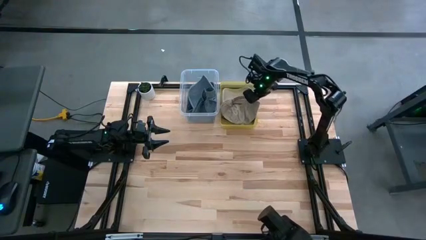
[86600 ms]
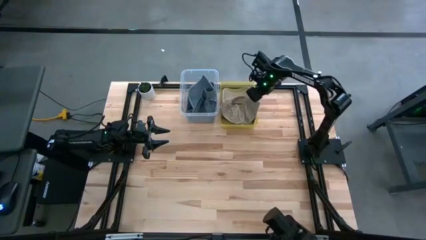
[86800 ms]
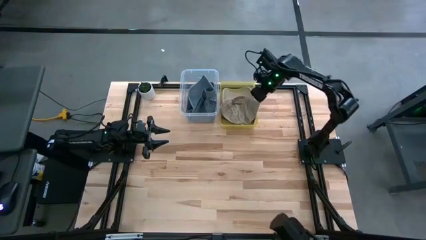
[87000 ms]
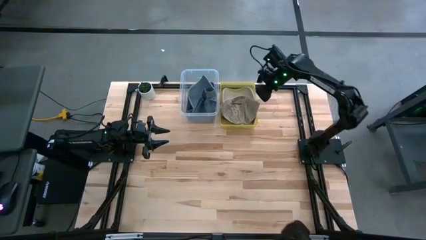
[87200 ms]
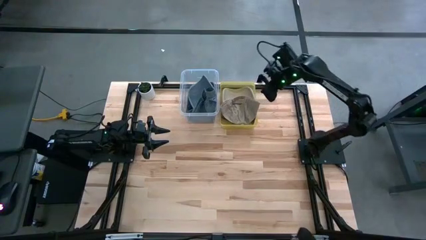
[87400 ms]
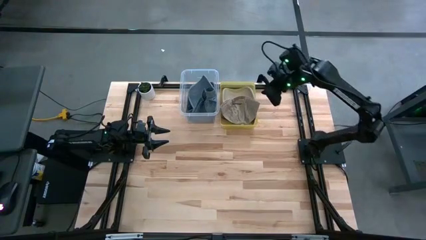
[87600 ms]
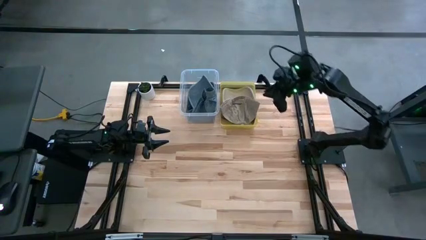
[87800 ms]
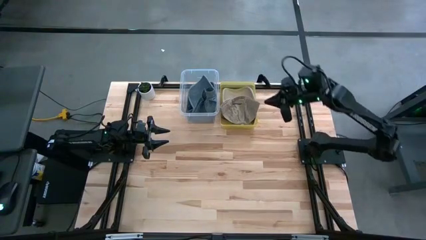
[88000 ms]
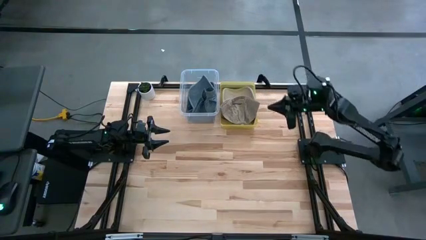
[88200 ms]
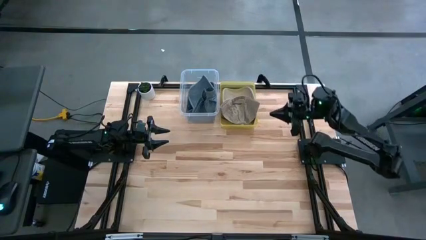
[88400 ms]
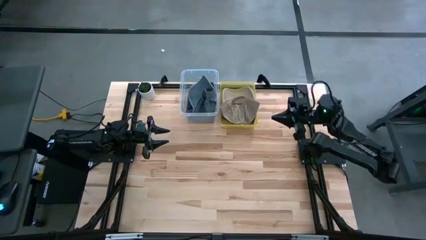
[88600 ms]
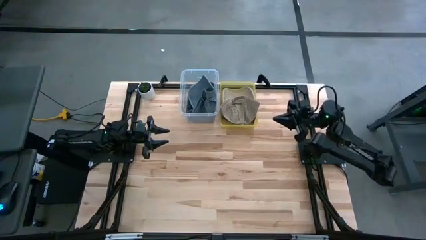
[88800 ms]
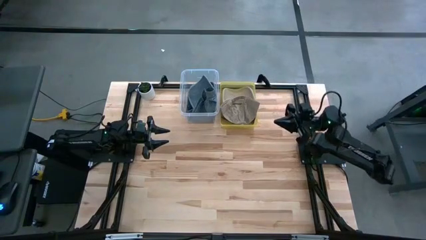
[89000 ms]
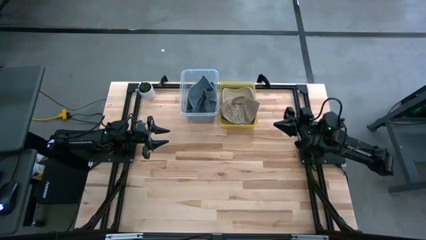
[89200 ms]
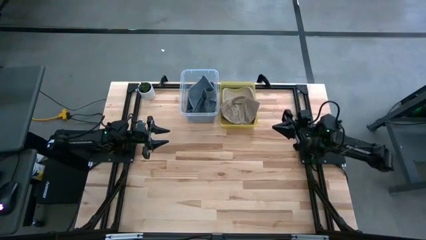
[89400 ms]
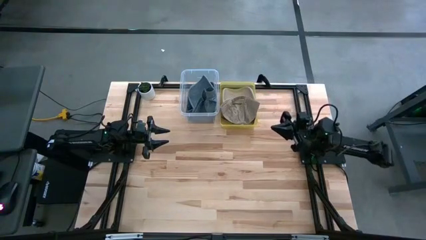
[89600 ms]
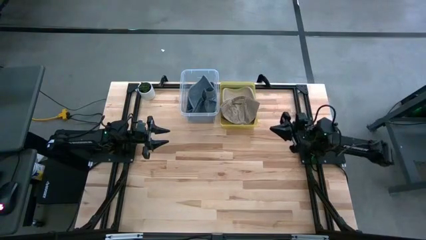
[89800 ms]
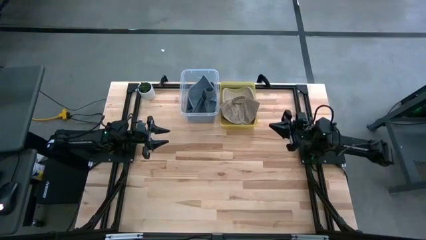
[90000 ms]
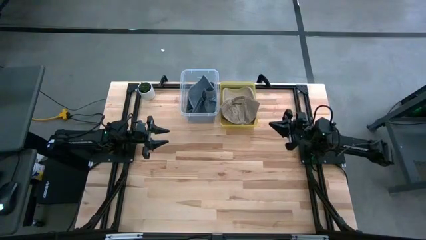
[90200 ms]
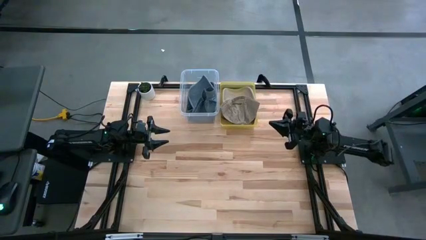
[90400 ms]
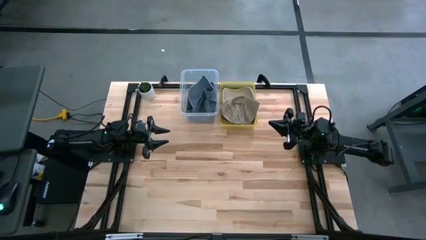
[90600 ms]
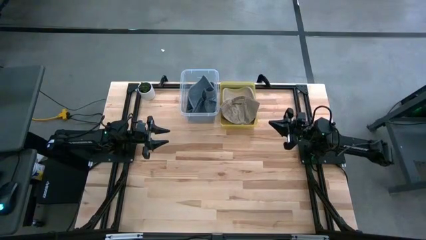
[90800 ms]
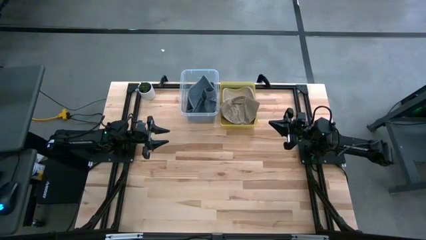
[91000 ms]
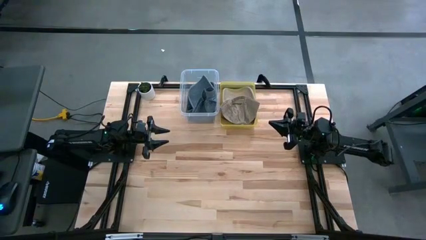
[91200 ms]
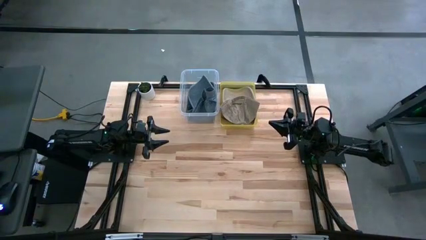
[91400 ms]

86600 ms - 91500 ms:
Task: Pick & Place hat
Return to Home Position

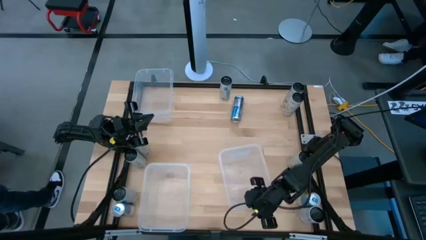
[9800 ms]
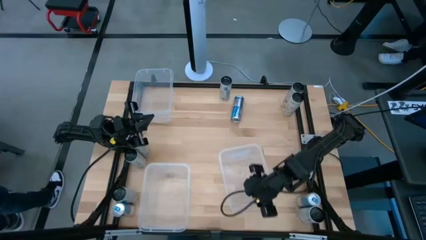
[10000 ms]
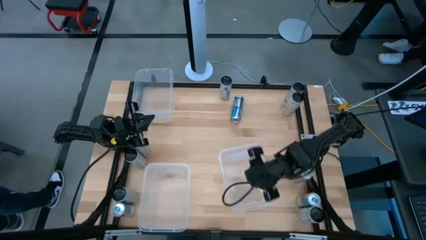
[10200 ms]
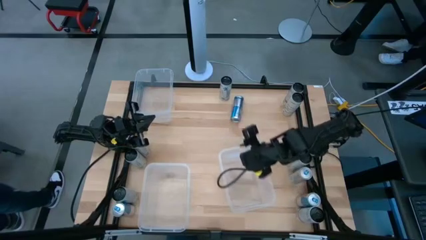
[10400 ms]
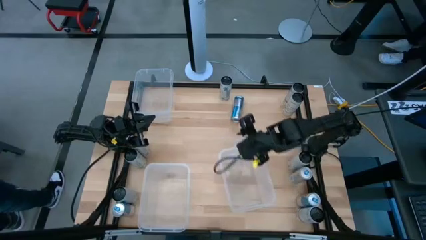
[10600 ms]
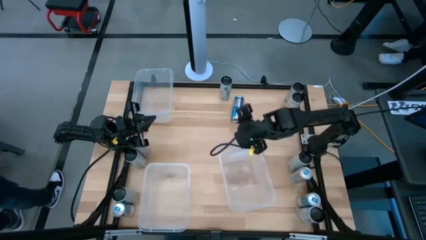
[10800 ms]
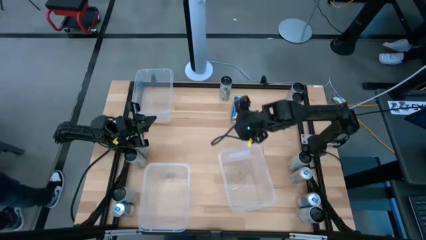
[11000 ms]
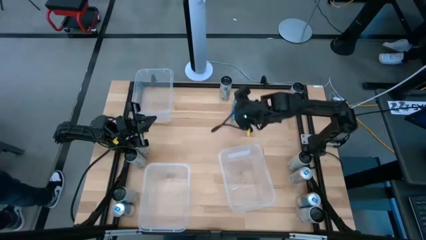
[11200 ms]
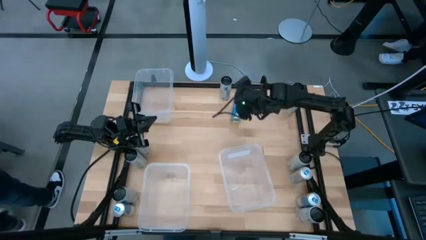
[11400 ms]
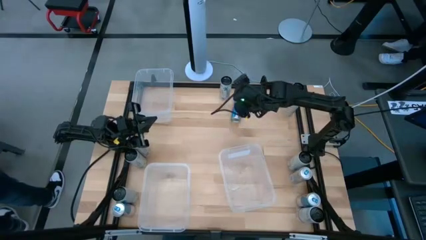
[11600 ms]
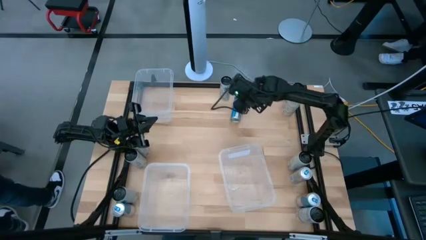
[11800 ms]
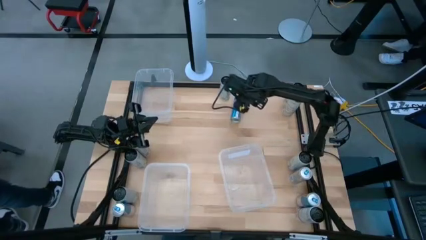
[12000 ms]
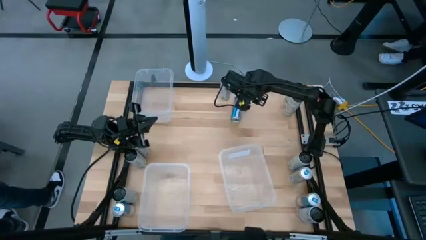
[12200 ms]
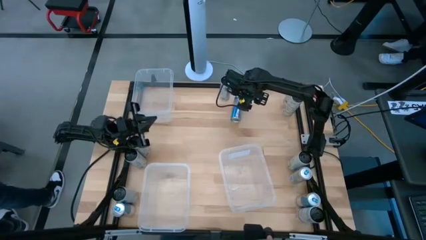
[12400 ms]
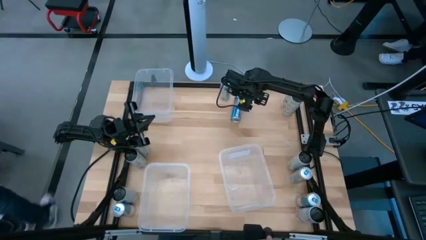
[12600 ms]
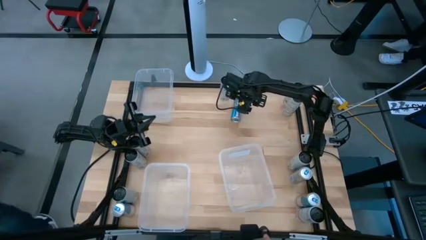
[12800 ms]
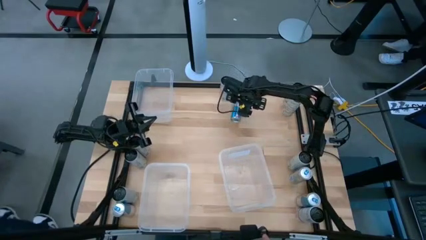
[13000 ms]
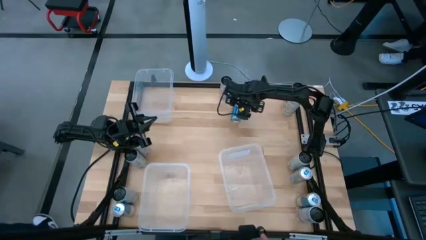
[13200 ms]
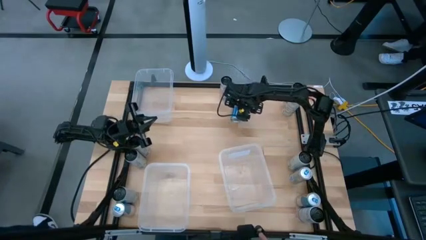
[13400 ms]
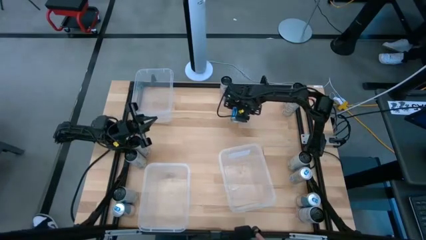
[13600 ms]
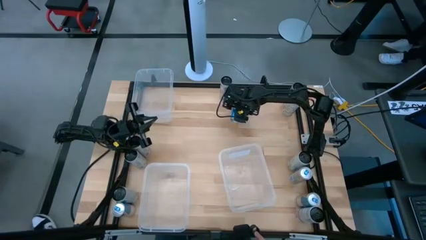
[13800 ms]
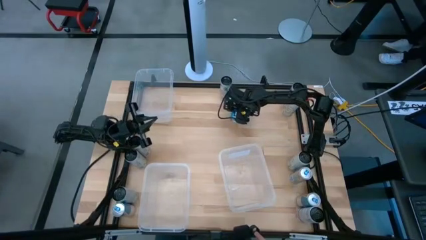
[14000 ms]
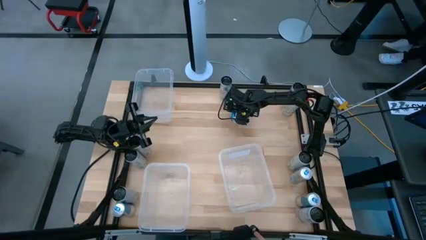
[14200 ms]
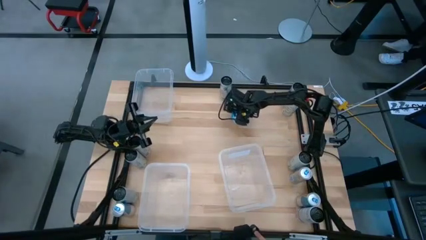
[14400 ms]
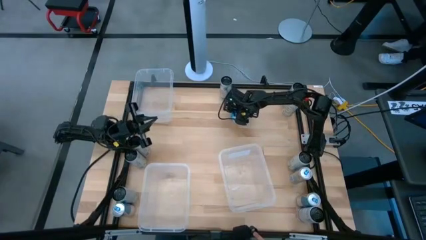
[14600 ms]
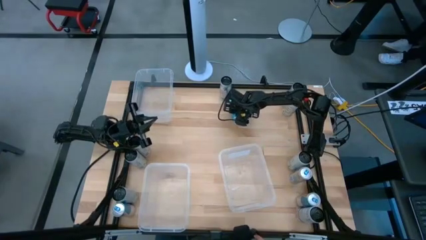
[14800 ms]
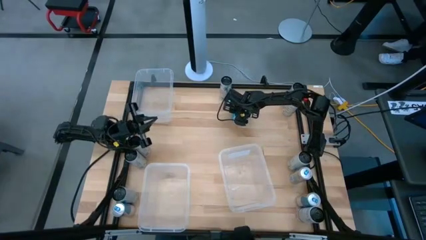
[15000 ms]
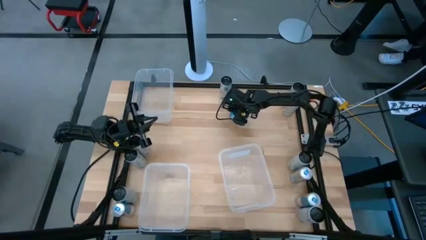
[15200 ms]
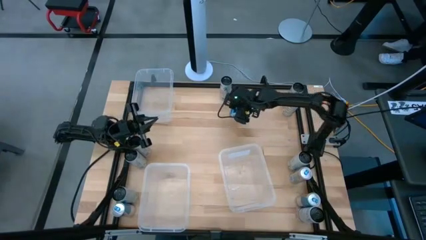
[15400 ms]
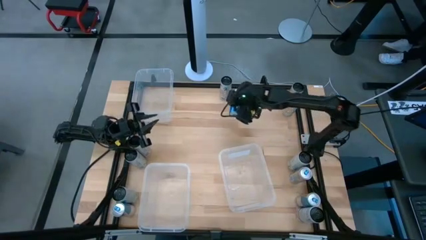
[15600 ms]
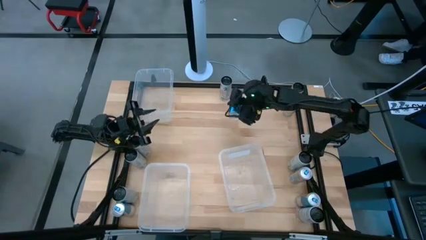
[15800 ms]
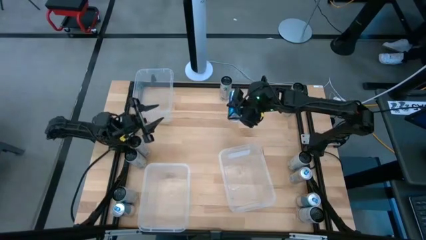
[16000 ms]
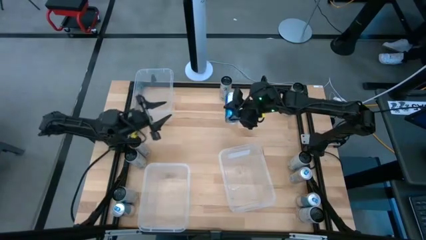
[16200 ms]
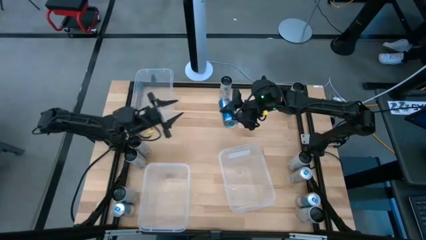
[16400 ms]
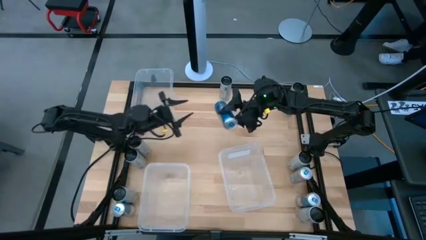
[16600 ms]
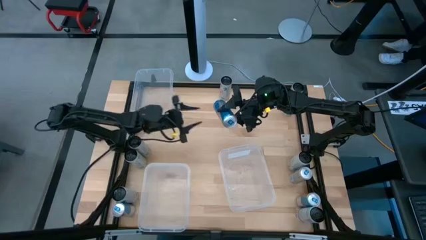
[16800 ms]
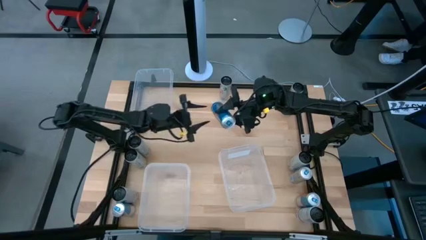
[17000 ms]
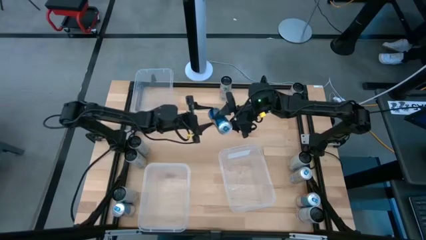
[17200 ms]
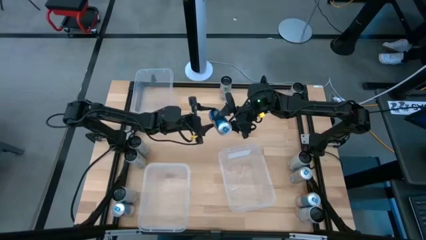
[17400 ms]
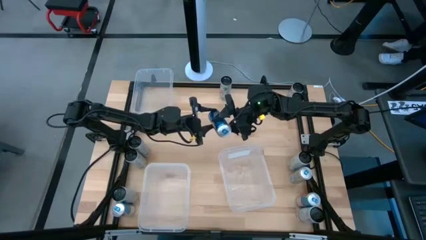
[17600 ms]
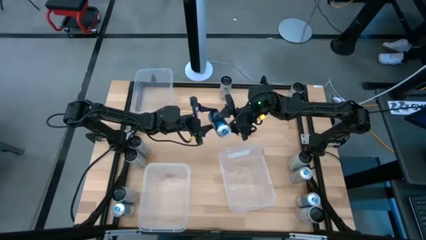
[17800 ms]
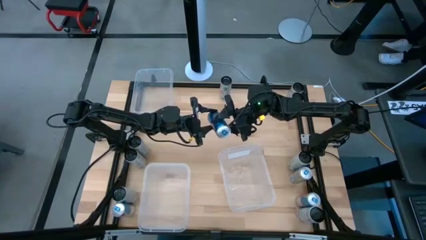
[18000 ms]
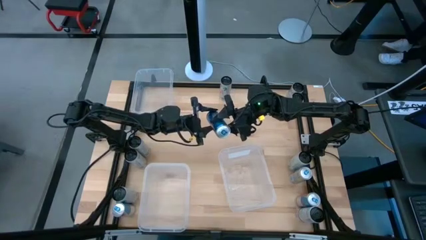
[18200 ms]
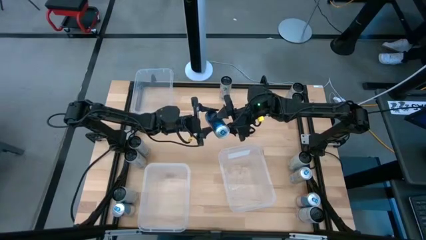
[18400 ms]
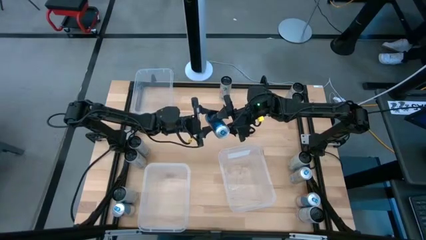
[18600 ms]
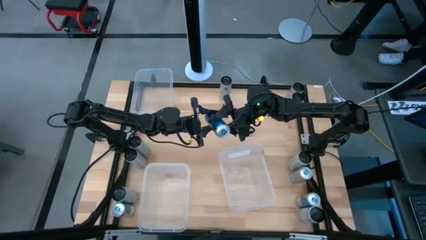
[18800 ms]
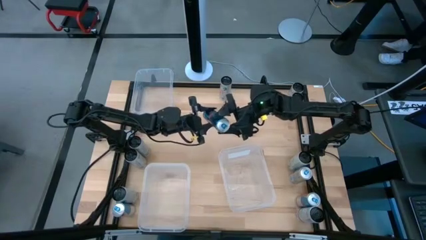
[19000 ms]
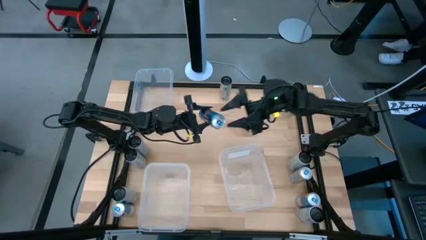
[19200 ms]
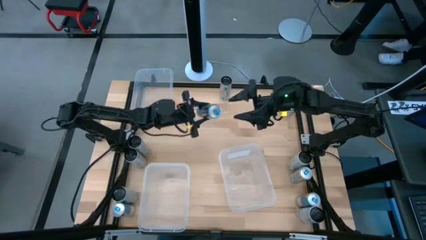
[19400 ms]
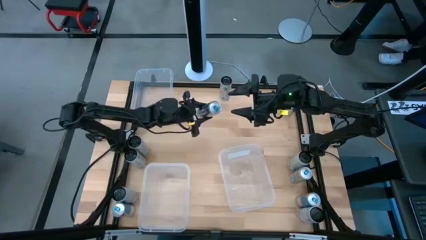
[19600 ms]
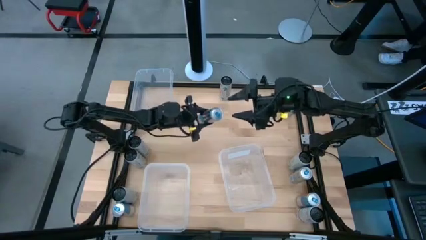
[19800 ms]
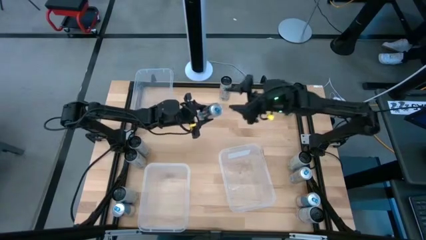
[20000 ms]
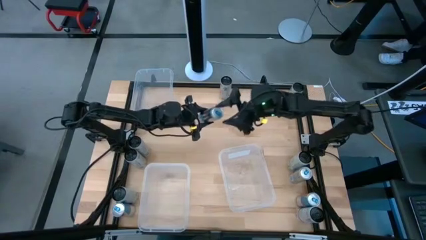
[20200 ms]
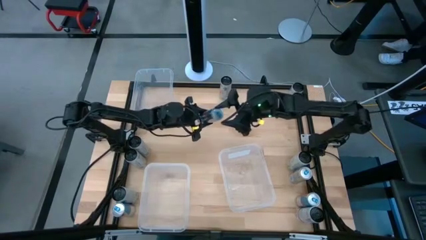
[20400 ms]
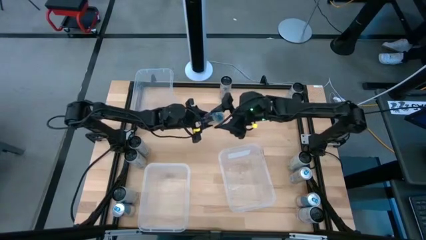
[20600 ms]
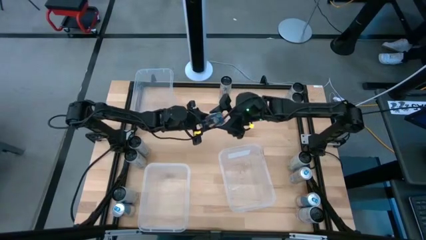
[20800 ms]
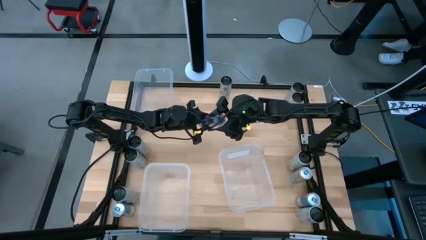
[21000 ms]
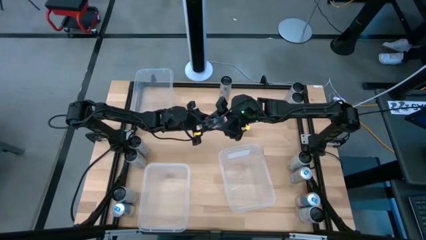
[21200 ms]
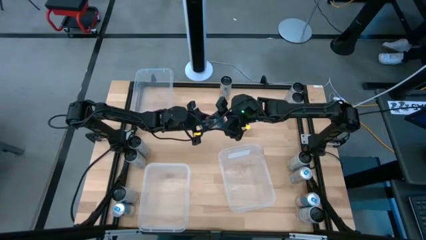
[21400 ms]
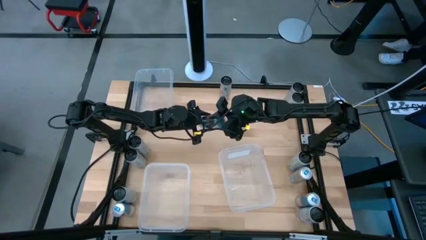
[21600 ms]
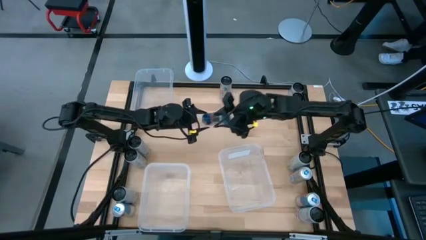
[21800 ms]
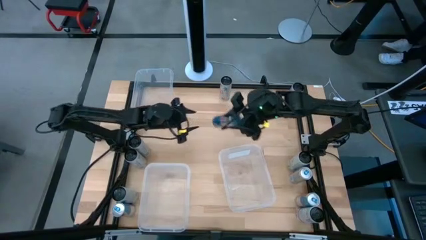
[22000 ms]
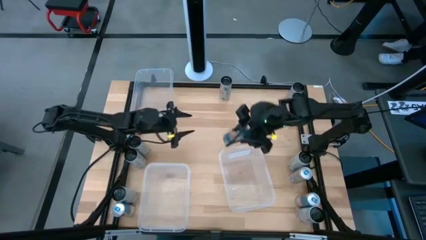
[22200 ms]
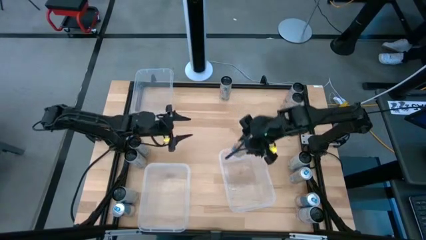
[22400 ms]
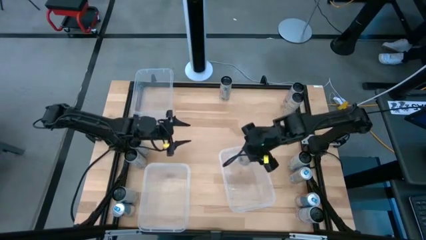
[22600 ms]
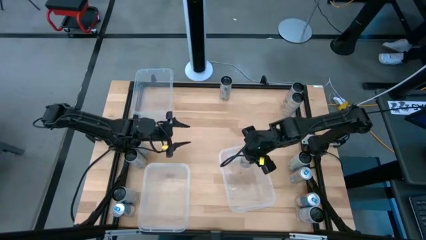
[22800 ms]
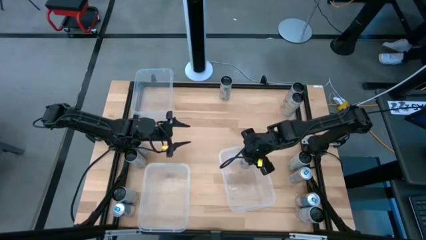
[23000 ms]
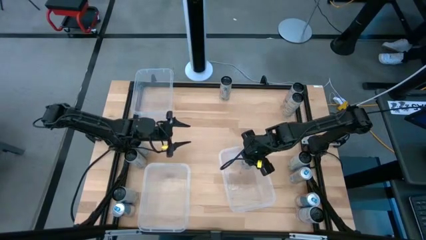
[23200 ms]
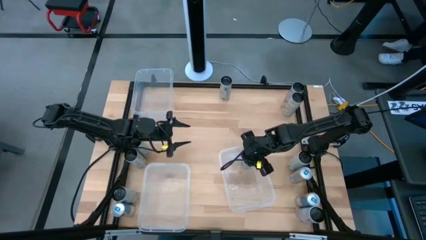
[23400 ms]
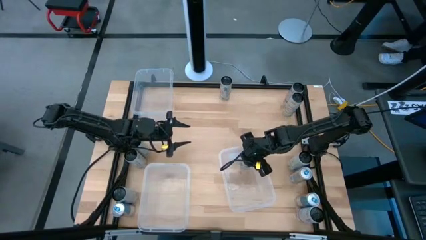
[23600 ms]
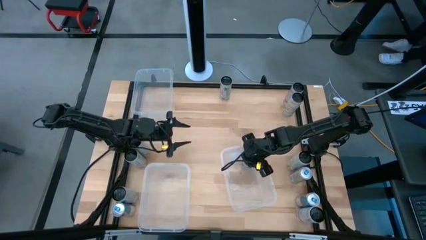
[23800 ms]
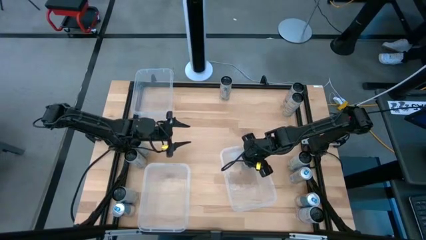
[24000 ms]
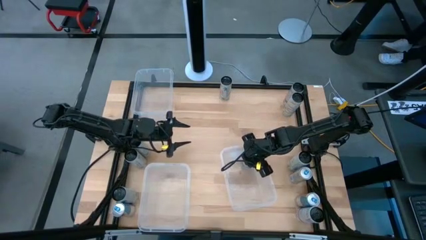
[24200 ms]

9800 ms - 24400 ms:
Task: Sort soda cans
Put the top blue soda can into the bottom right transparent bin
